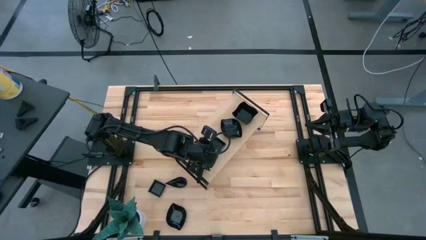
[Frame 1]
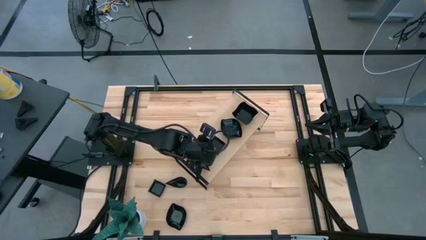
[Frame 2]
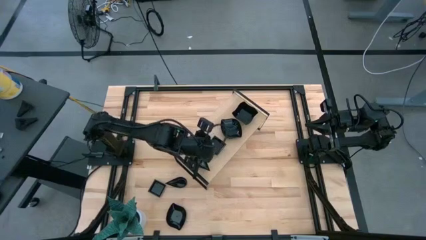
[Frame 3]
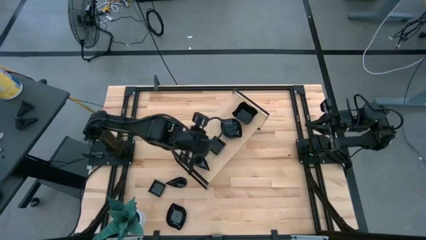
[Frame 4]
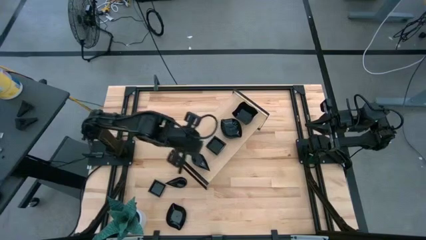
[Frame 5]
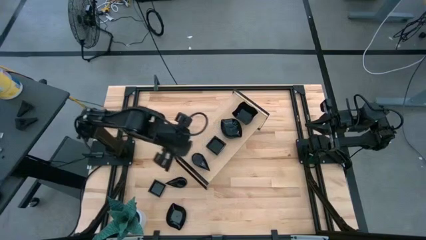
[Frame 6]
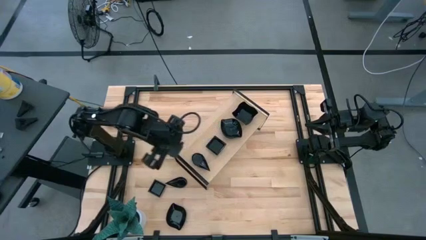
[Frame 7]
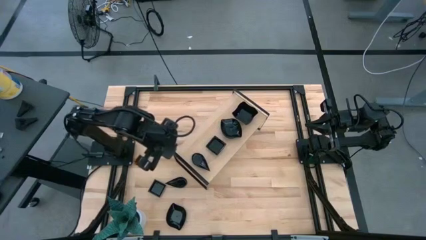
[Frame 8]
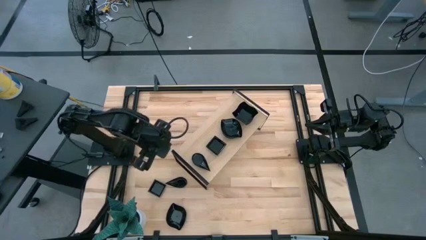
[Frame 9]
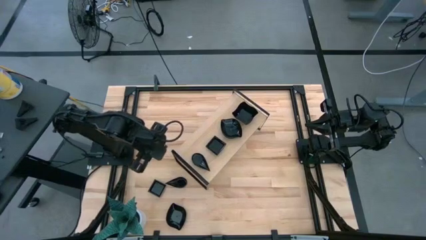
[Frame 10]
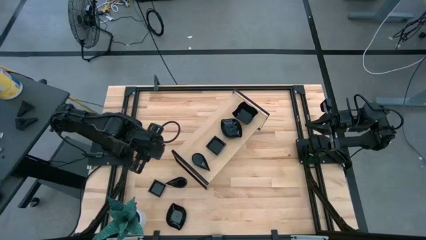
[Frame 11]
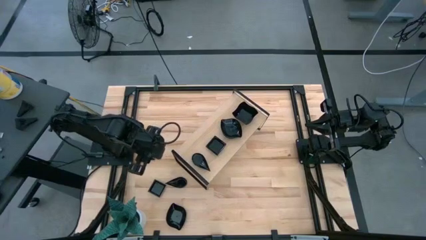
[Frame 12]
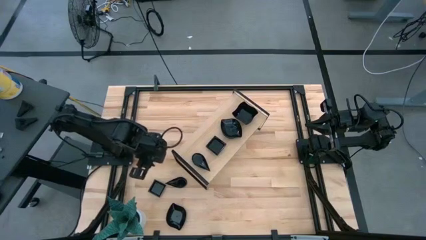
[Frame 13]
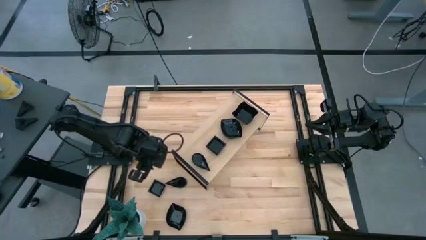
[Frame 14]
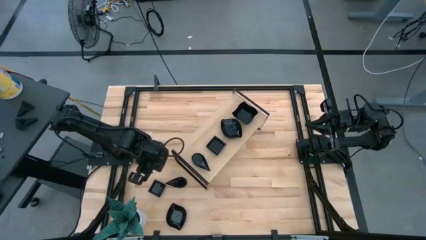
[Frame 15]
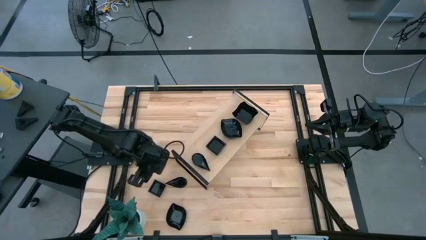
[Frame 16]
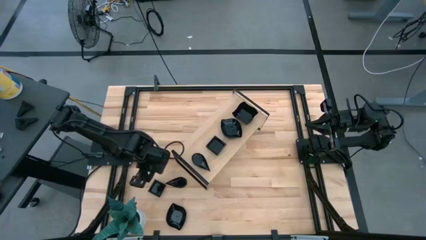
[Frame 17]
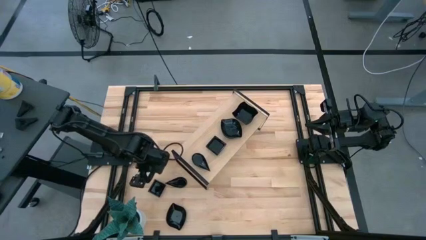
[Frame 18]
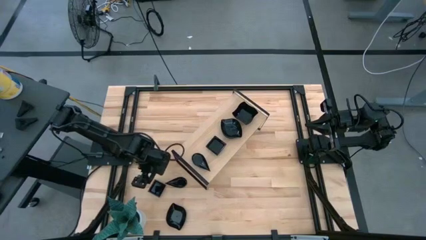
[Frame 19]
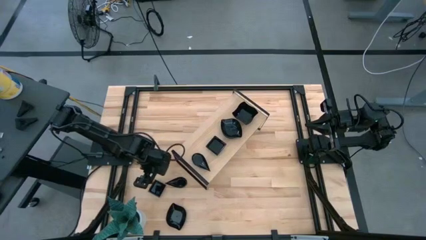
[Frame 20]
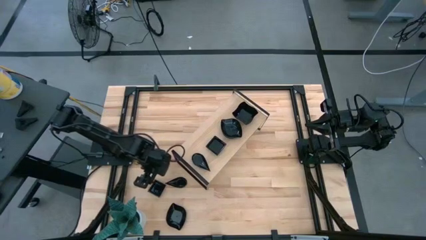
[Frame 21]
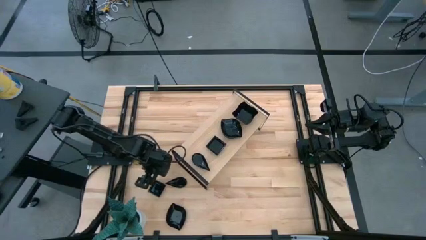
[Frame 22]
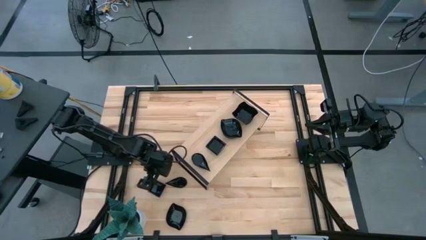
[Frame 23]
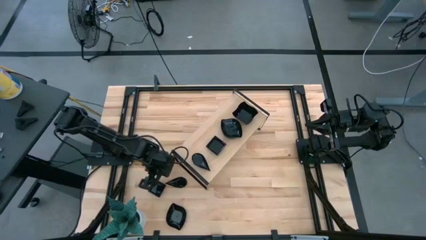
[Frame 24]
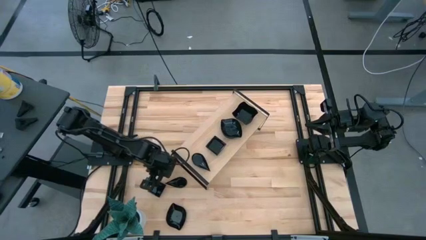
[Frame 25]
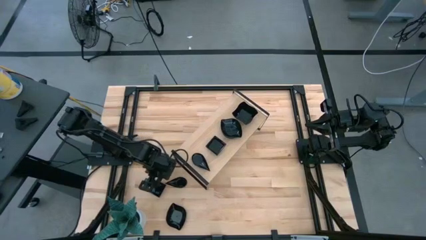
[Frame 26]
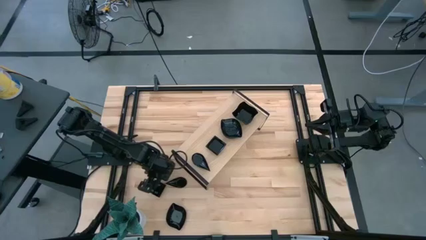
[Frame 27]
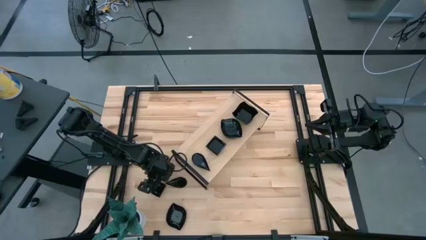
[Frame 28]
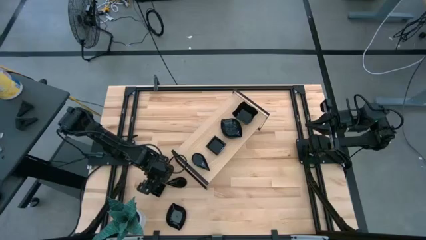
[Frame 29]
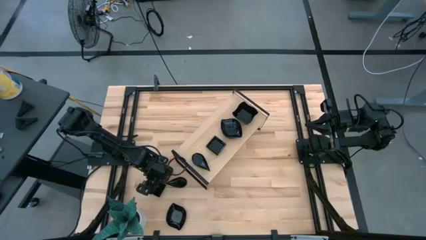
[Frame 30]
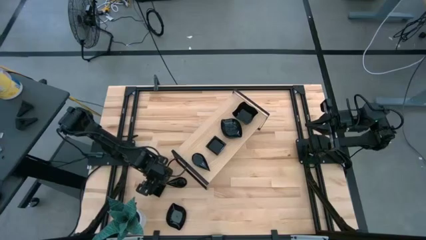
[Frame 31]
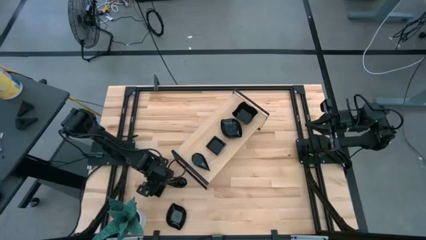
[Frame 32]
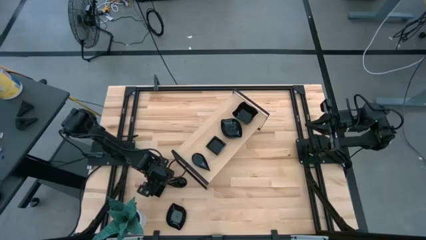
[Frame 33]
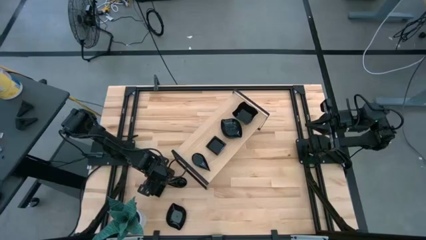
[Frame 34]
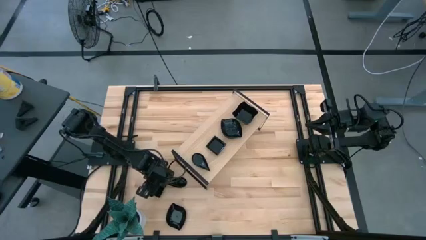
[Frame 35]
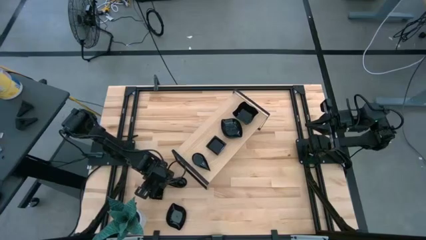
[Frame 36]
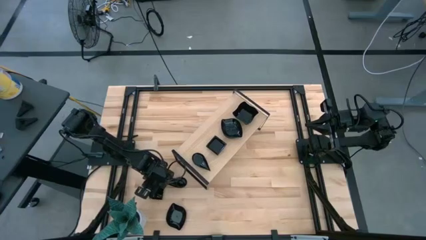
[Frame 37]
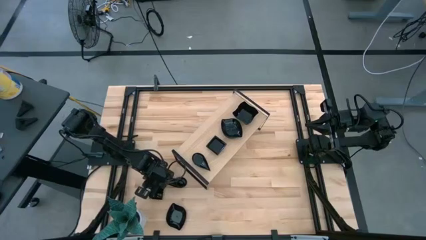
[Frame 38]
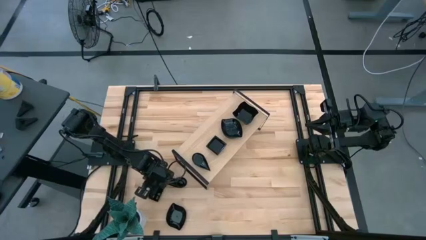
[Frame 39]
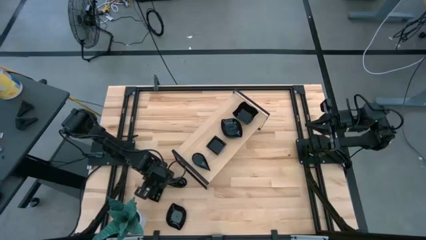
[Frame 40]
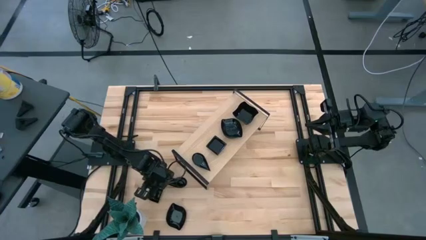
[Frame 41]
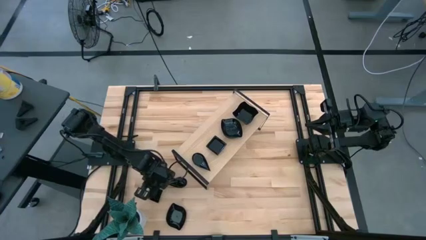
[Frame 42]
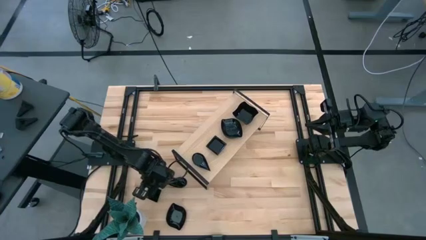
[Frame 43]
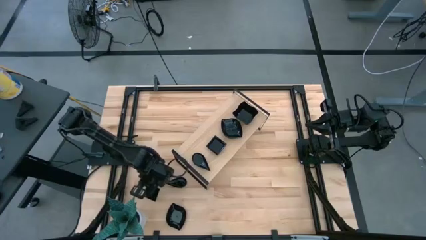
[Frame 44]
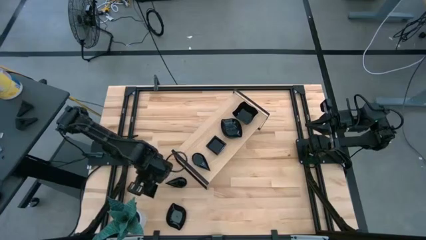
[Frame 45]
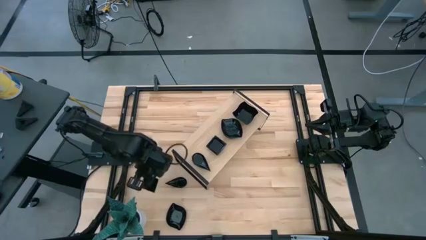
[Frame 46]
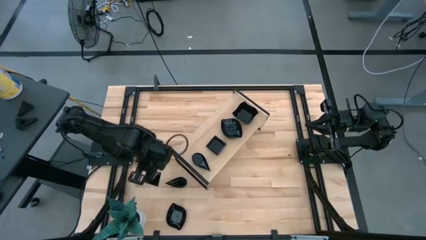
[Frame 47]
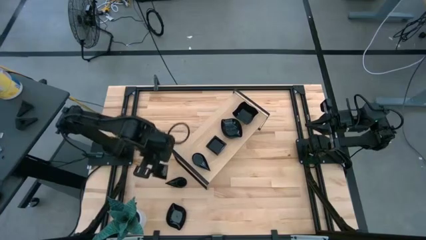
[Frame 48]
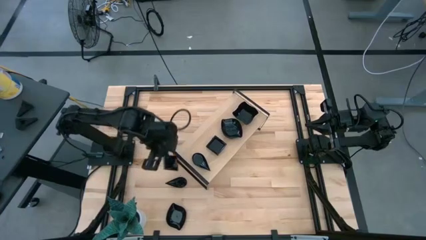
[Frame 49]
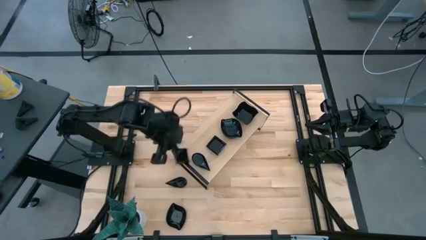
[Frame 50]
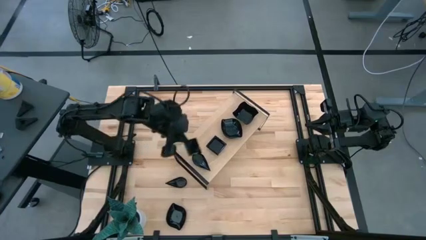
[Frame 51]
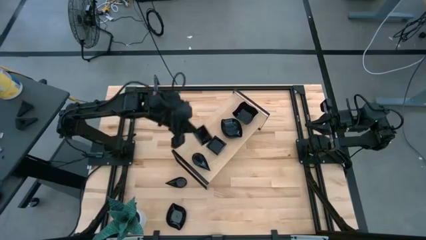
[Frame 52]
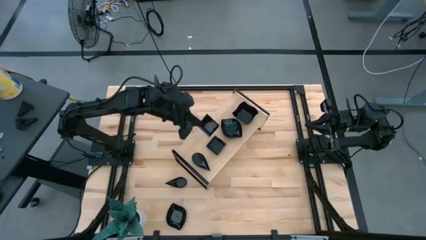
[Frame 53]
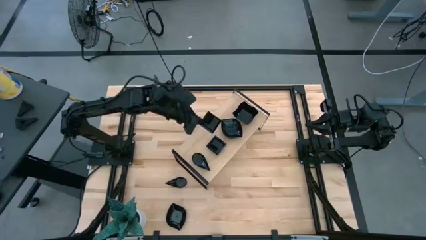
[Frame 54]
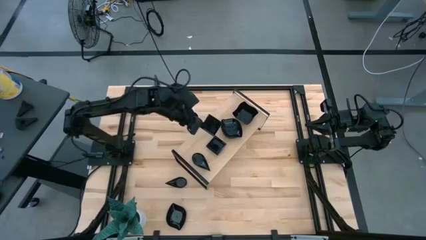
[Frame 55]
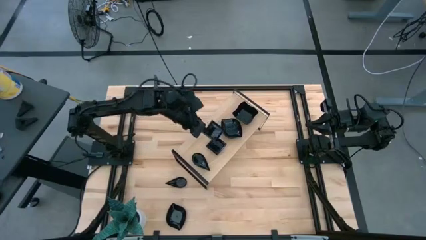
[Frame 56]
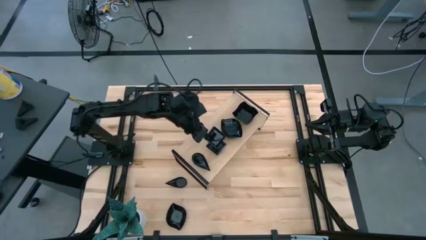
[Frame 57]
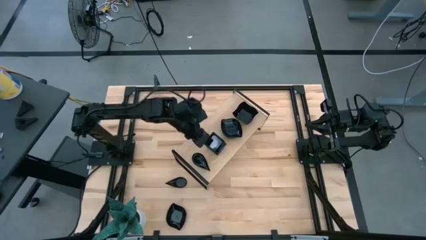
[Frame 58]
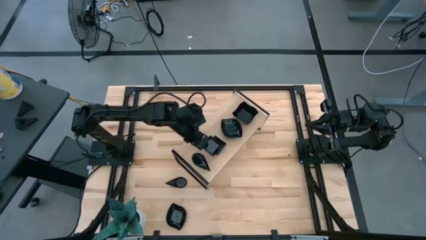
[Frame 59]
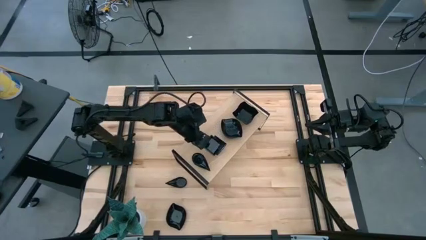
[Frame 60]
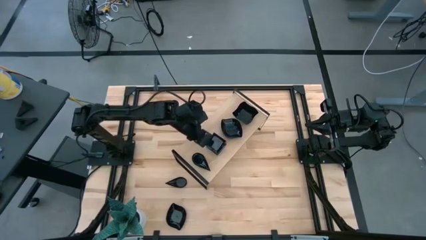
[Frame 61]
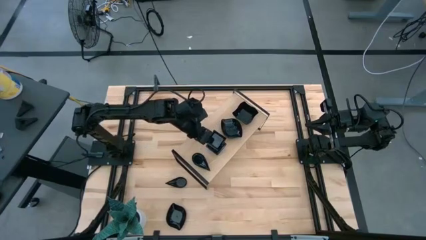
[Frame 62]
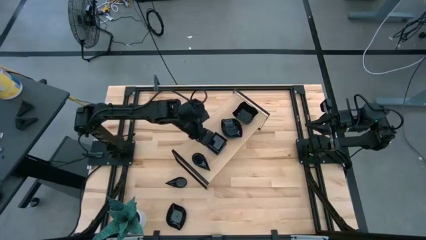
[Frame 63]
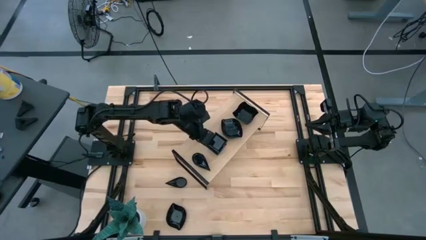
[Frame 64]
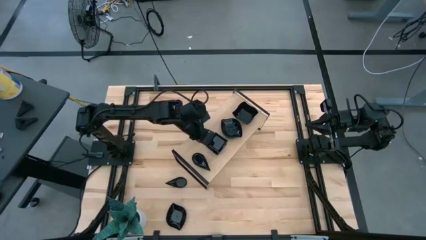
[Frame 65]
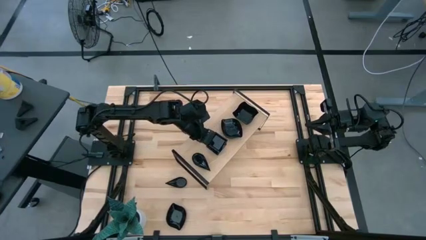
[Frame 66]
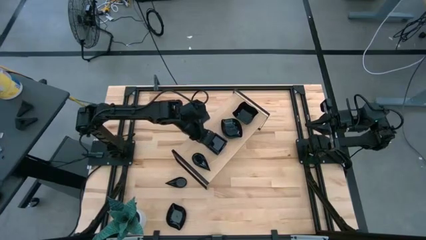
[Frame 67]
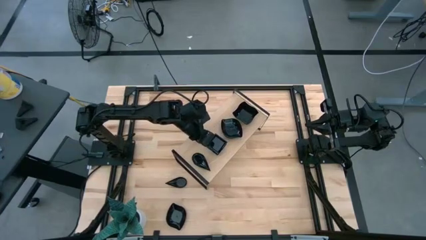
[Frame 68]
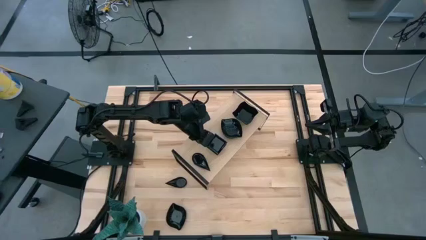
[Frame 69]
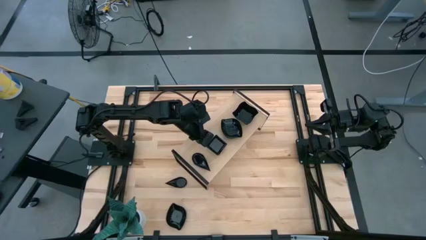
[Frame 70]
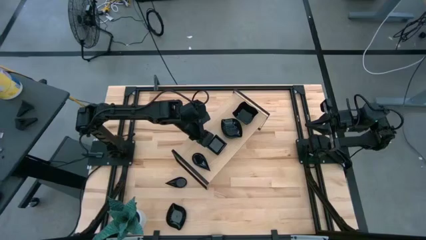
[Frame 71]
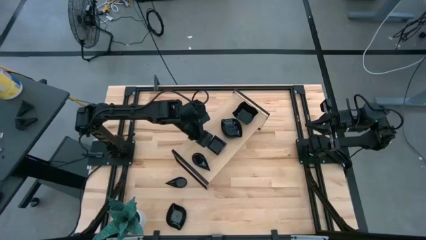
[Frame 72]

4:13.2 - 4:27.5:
Task: Pick & Place Mini shaped plates
Stack the black square shaped plate on top of the black square shaped plate on the shelf
